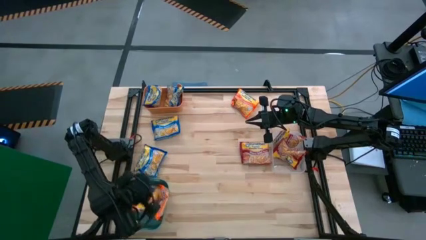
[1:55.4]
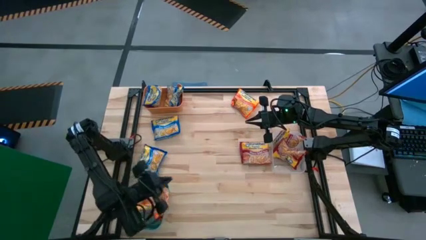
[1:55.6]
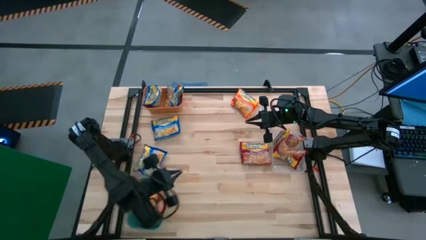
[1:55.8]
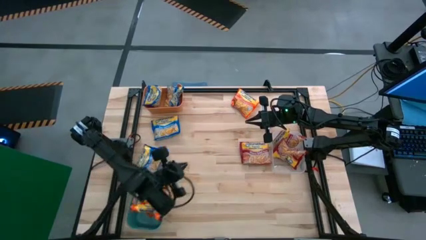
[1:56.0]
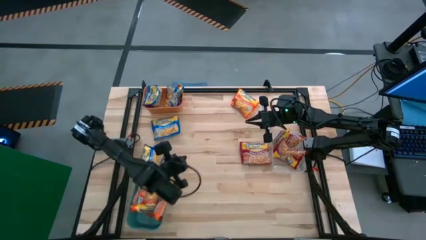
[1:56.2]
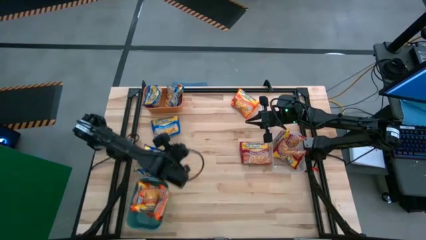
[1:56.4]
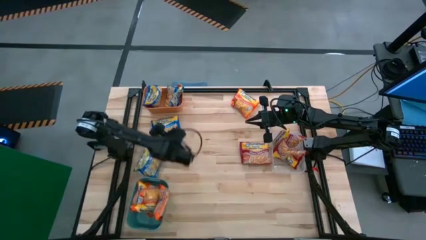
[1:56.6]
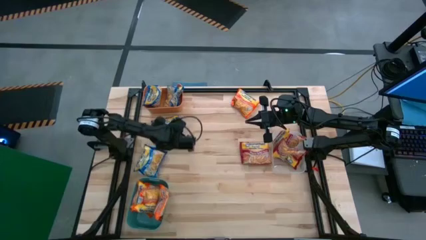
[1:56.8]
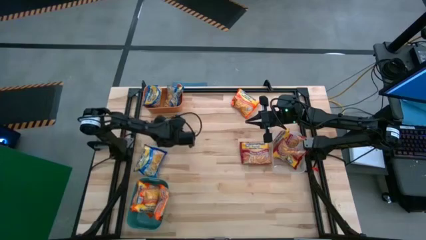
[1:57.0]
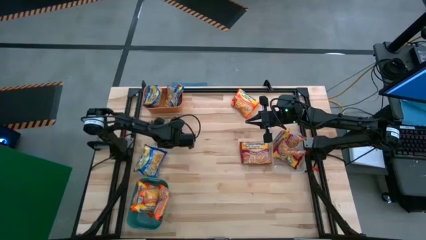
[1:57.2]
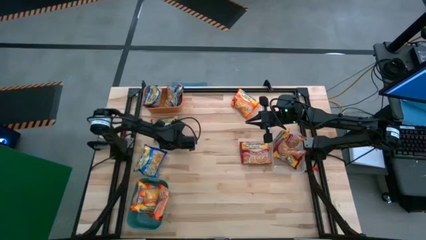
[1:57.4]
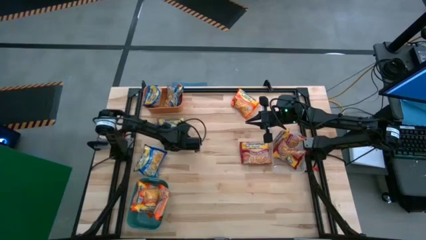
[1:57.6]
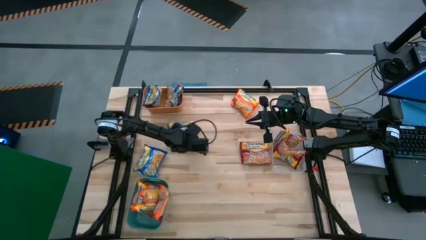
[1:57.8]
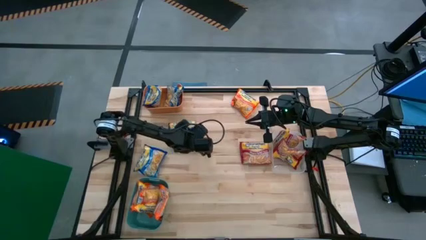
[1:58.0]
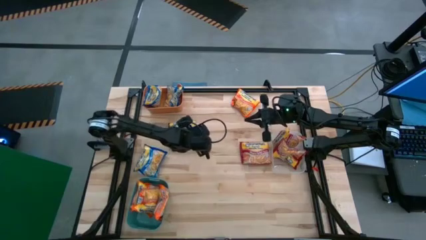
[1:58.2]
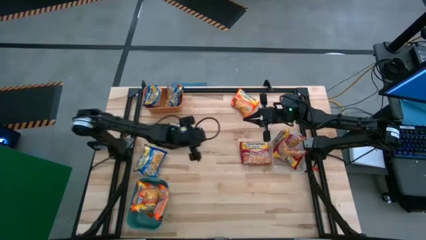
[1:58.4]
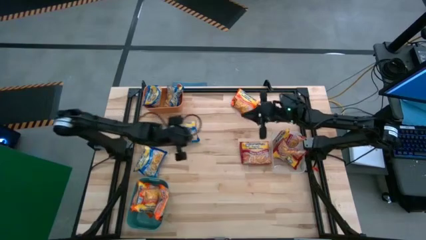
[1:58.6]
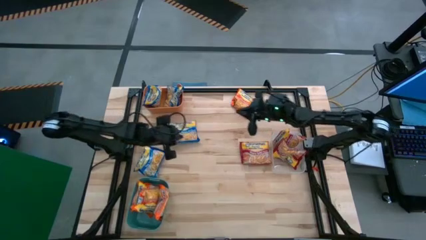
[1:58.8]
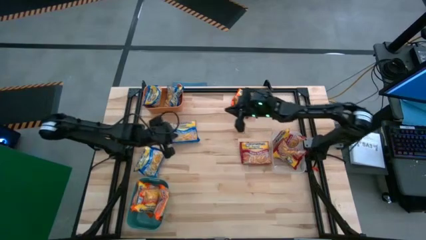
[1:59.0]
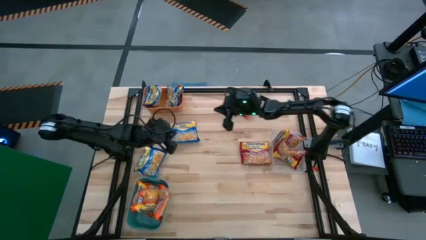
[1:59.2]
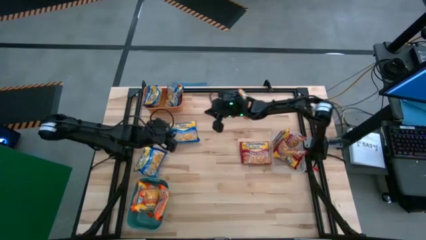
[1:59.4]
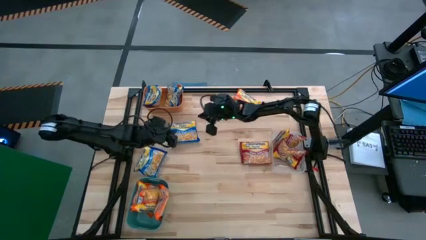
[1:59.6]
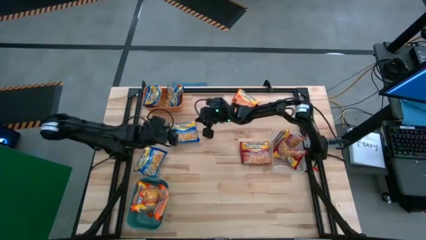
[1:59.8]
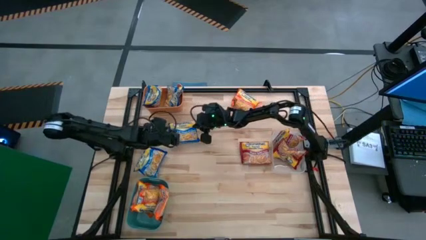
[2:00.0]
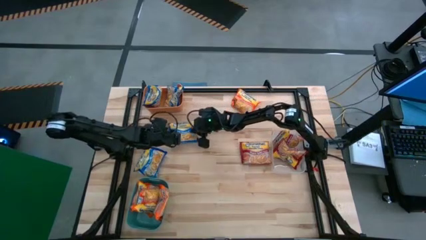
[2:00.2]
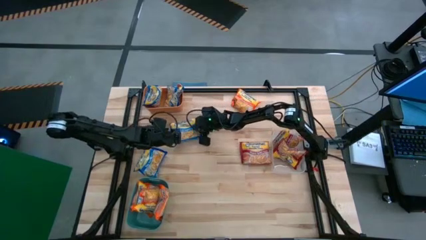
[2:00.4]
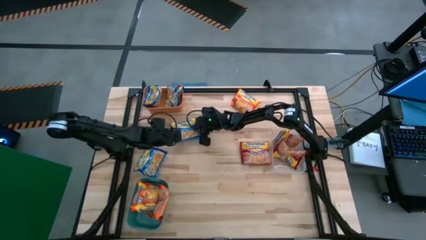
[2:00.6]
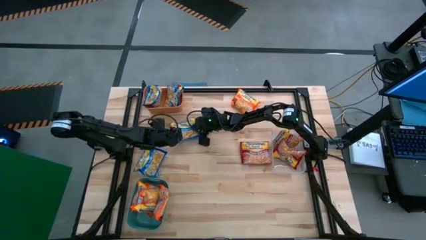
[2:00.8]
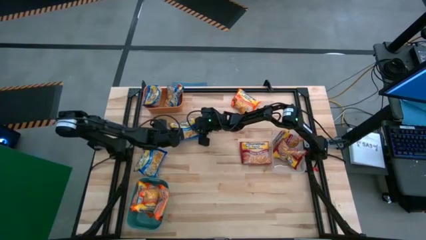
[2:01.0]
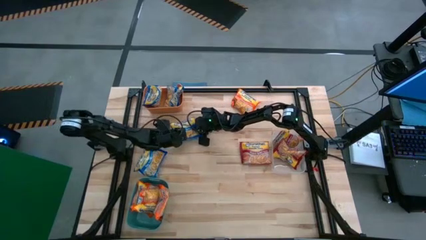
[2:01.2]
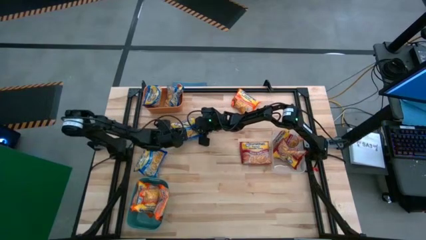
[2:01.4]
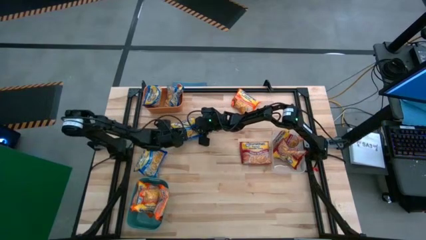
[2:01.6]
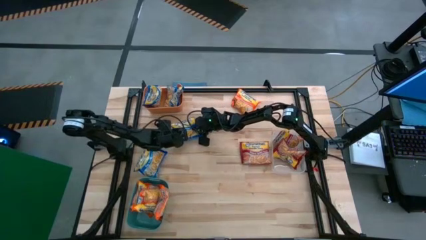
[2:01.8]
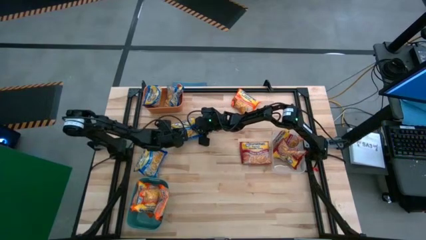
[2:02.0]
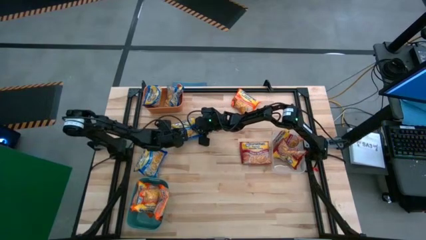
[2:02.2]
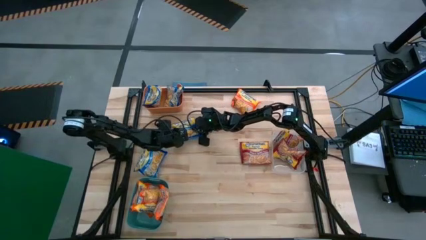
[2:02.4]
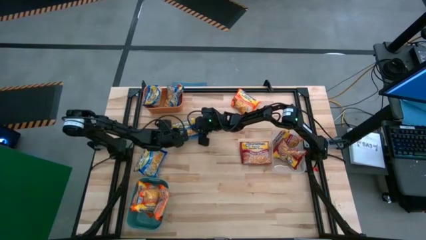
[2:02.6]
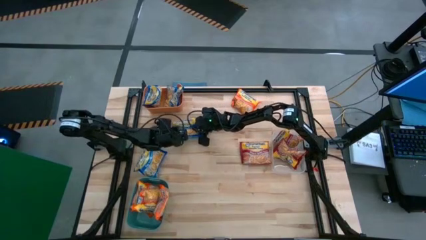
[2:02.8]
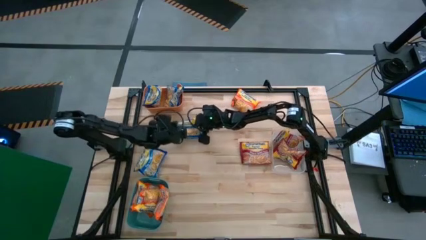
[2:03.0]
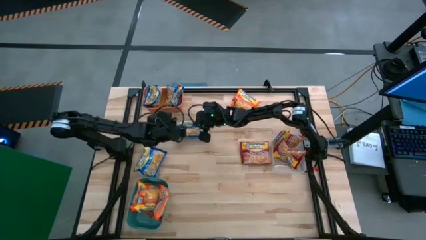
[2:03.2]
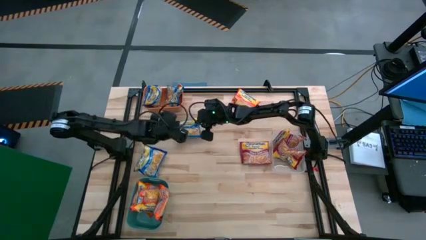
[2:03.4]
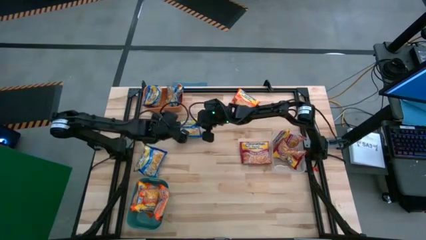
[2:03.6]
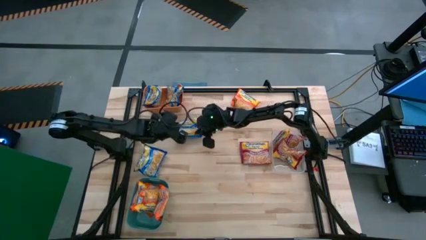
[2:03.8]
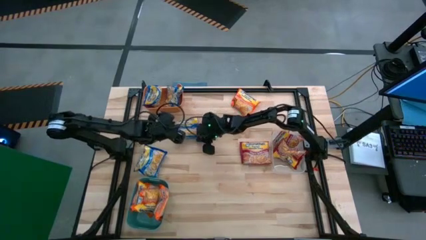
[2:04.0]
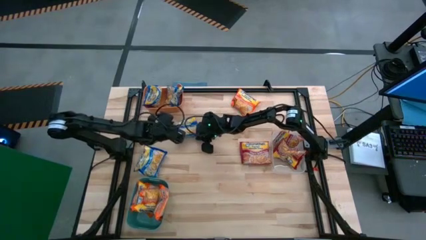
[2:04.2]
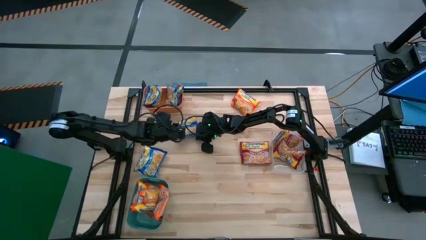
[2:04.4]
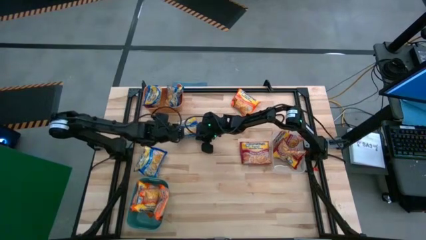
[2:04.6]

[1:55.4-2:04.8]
Task: Sort Maruchan noodles
Put the blue noodle pack into the orange bin

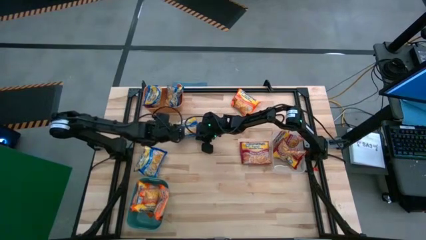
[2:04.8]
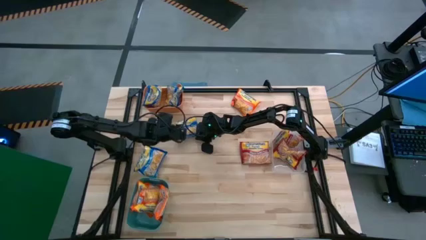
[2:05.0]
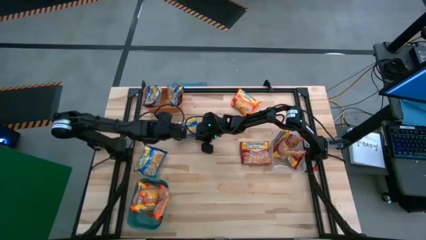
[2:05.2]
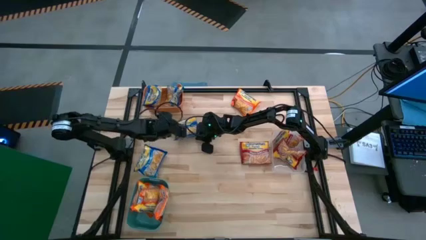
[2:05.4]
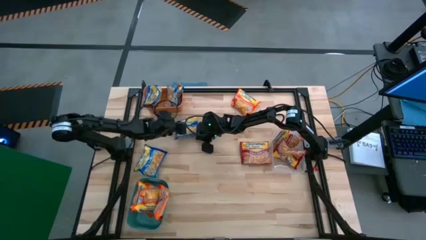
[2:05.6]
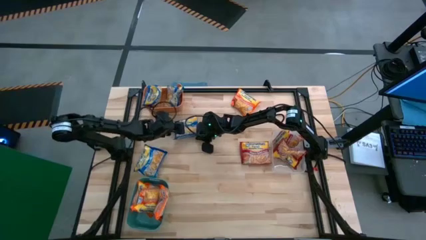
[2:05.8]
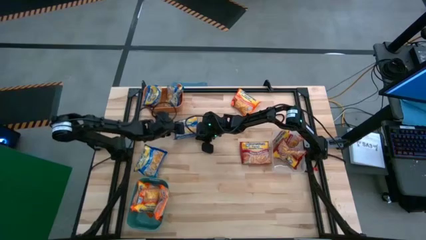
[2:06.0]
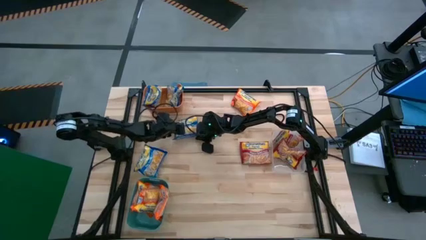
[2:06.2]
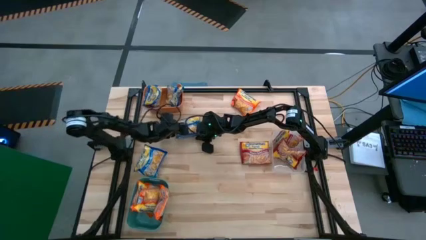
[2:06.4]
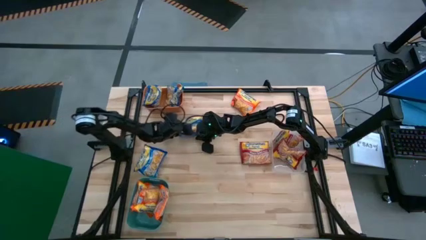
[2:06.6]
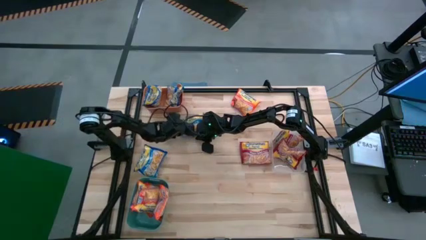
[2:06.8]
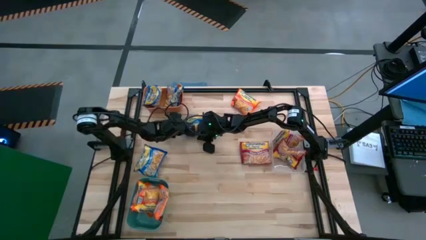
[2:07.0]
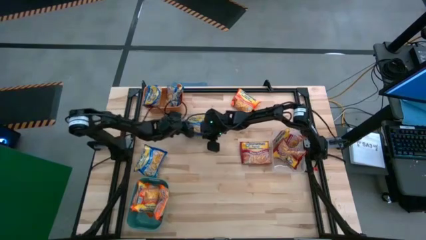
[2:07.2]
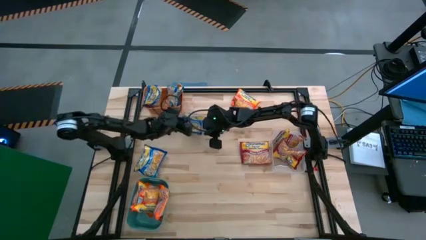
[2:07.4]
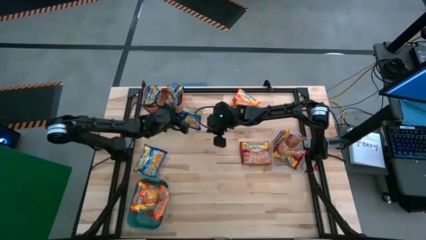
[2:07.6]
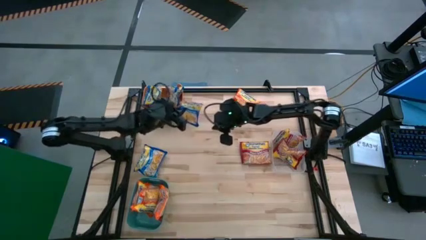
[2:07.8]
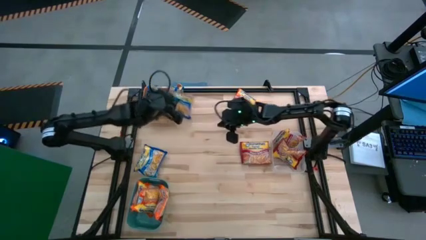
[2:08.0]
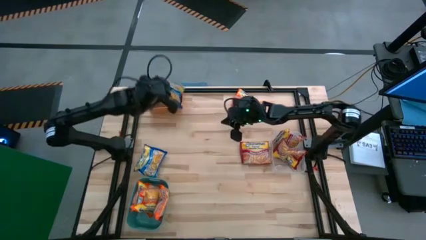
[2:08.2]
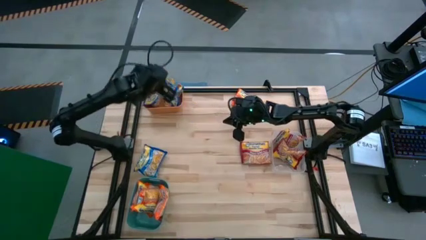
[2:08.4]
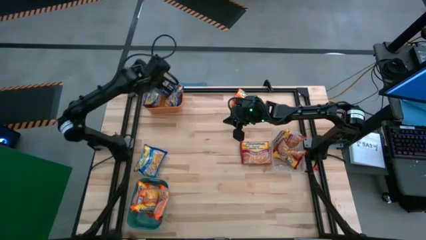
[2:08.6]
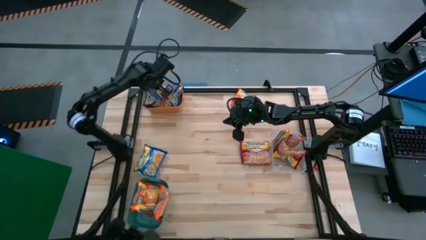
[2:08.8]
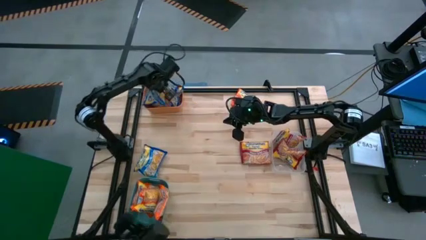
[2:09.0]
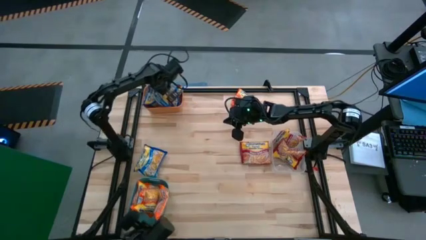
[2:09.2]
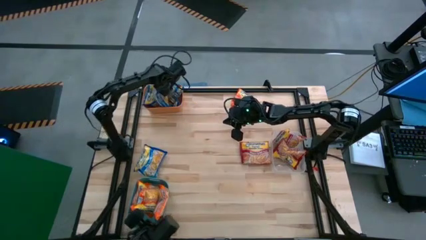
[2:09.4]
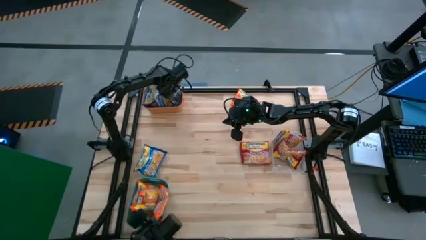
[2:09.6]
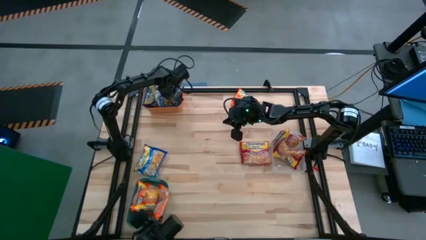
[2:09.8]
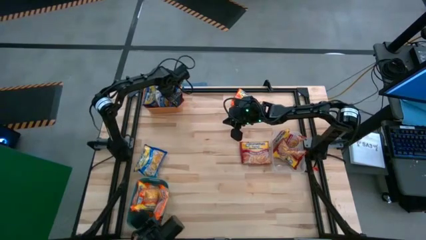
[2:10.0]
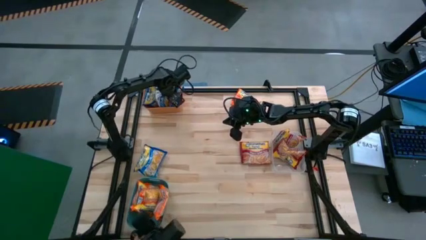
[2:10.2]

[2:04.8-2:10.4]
Put the blue noodle pack into the orange bin

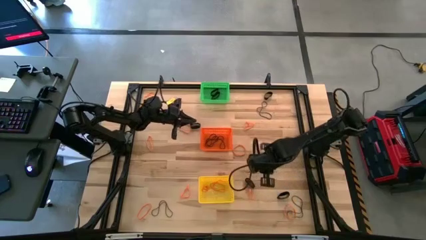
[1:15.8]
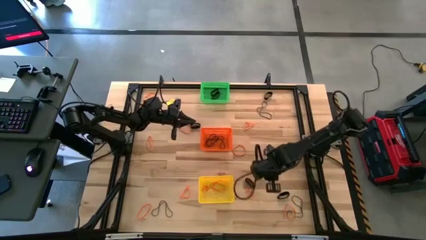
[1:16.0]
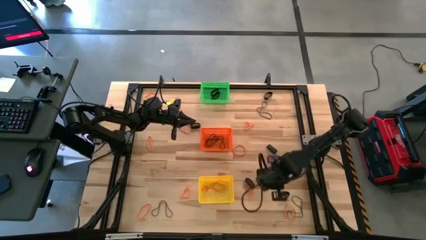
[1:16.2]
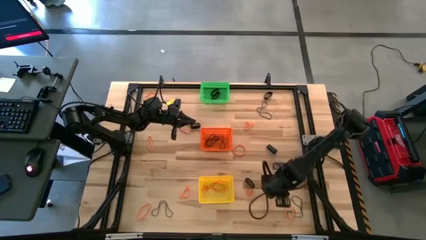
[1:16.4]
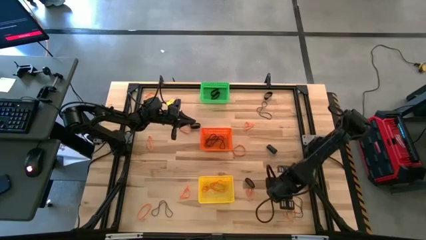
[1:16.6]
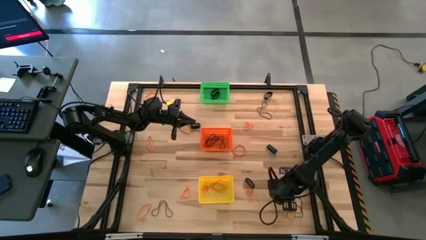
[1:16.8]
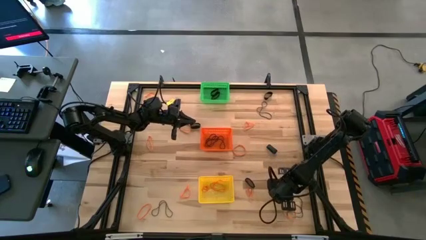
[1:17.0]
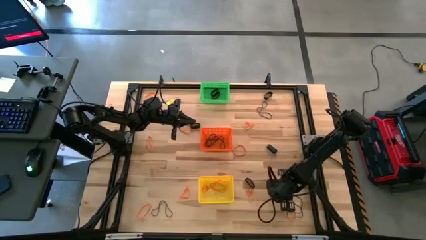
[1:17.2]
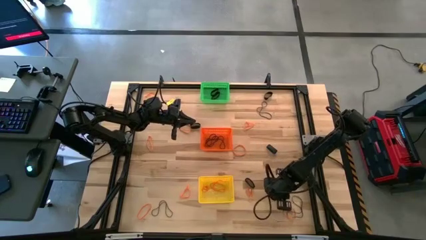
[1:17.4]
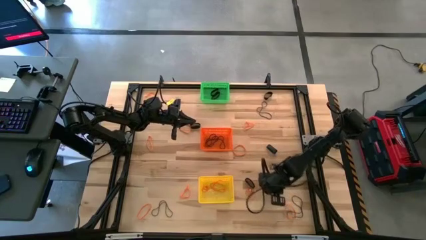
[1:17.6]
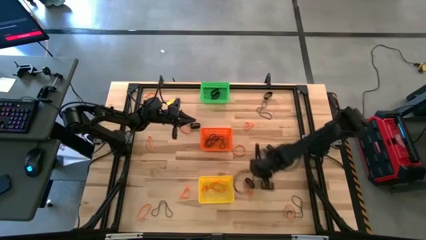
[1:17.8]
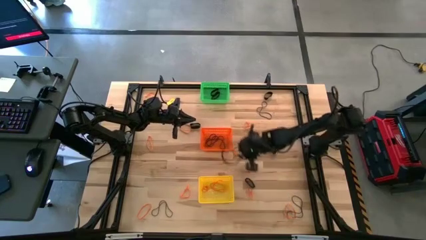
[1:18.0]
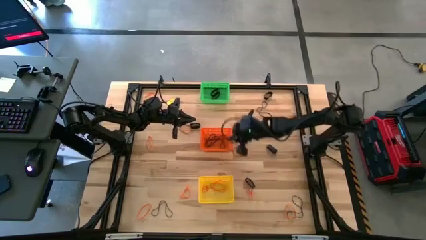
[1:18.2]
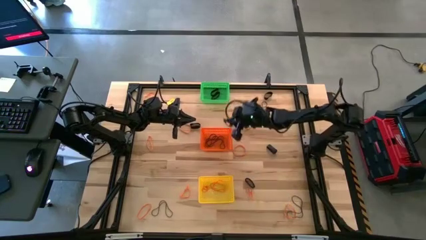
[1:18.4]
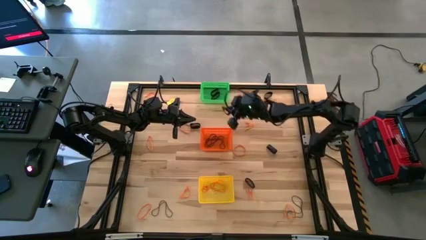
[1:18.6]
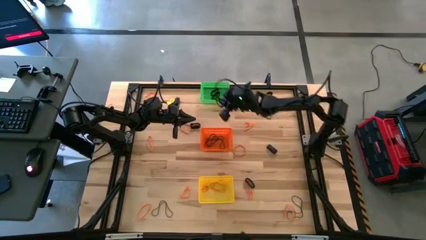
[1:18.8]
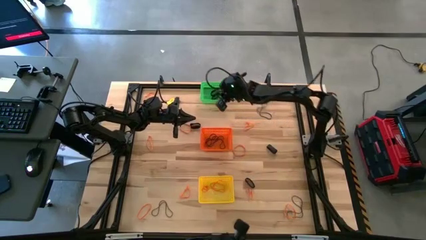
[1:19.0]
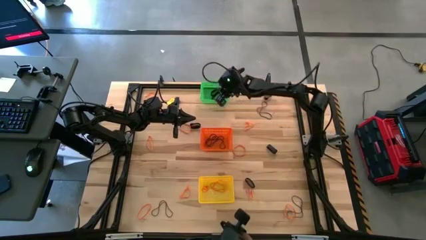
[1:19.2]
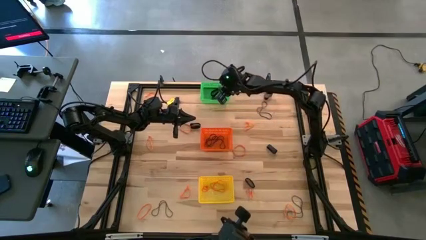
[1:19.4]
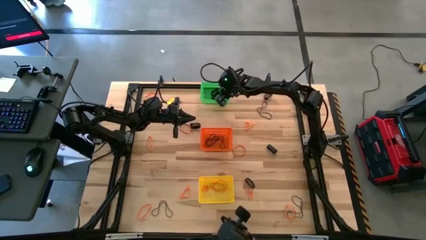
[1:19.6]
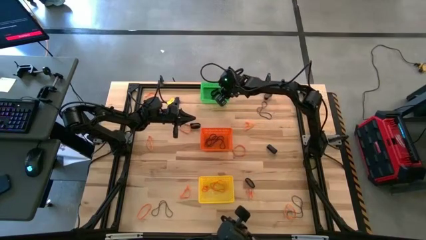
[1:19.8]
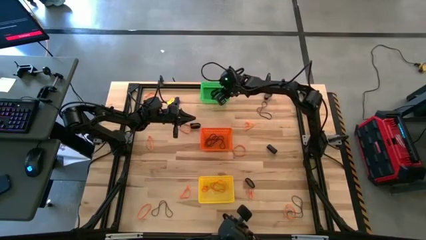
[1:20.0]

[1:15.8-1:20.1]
Task: Sort rubber bands into baskets
Put the black rubber band into the green bin
